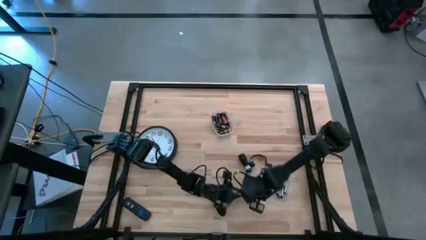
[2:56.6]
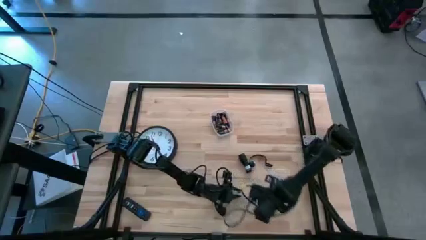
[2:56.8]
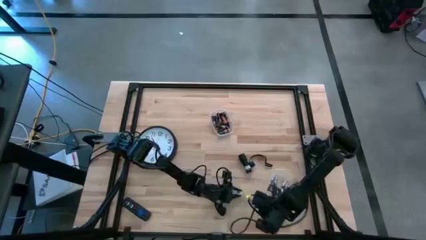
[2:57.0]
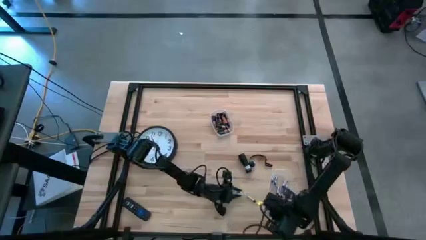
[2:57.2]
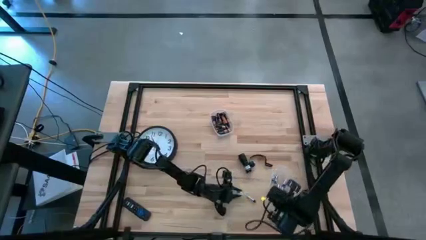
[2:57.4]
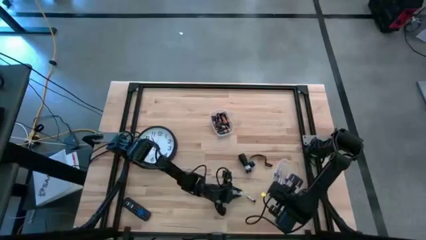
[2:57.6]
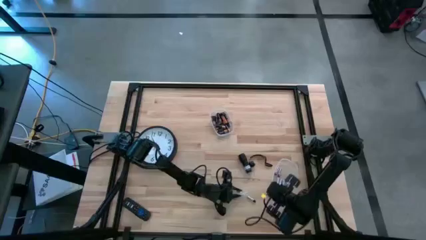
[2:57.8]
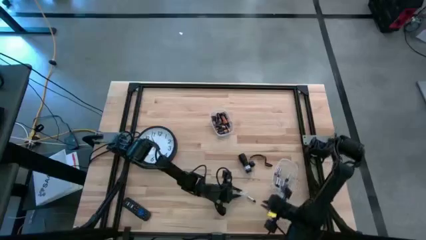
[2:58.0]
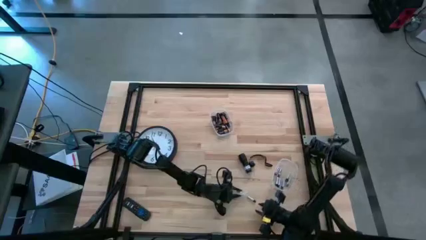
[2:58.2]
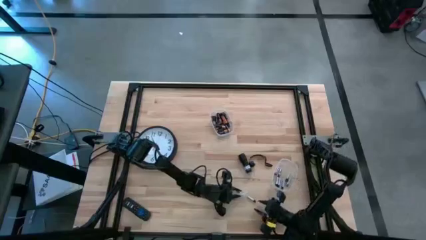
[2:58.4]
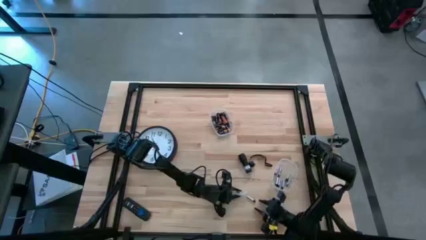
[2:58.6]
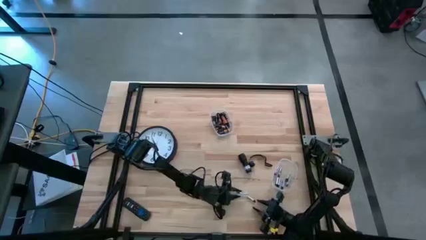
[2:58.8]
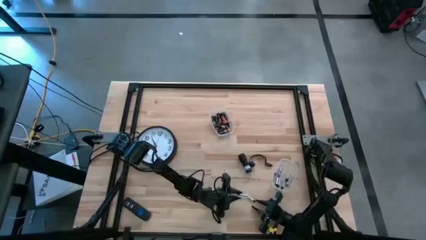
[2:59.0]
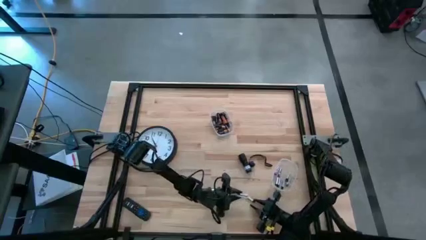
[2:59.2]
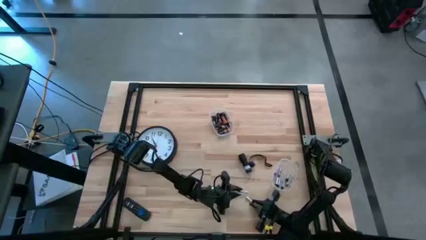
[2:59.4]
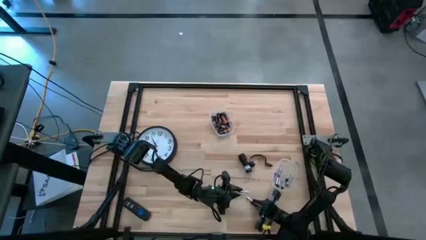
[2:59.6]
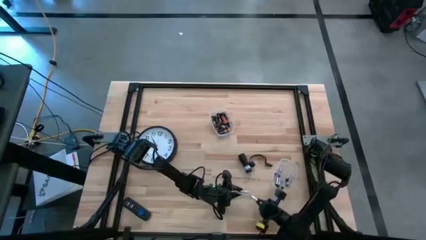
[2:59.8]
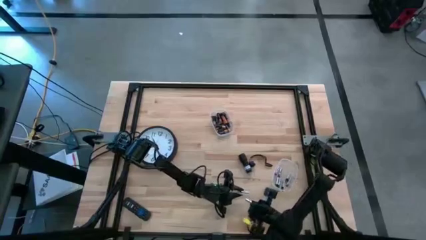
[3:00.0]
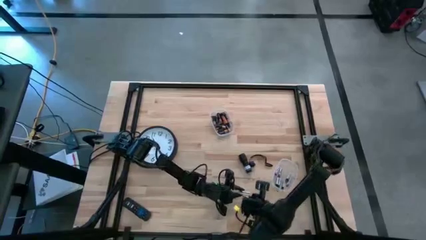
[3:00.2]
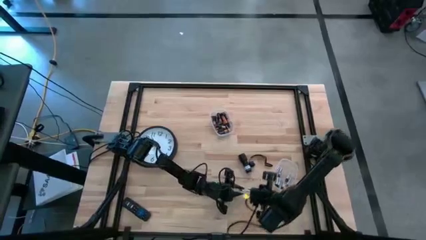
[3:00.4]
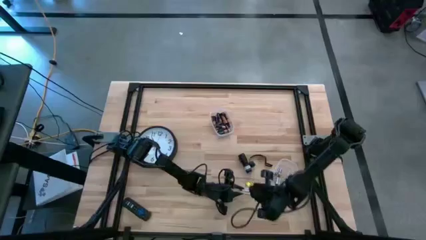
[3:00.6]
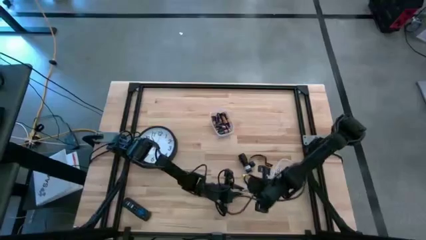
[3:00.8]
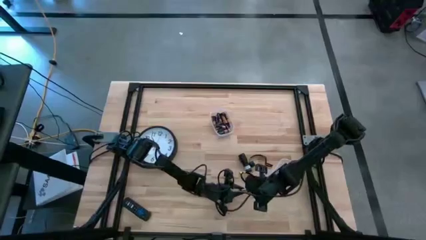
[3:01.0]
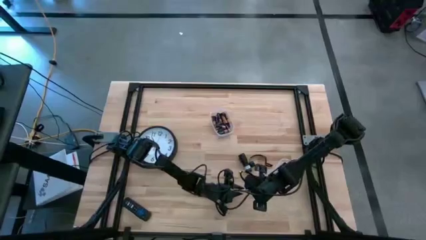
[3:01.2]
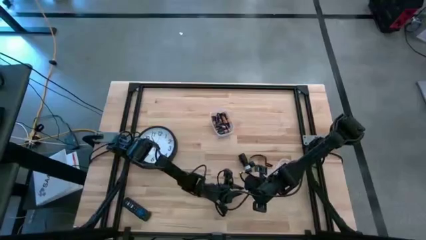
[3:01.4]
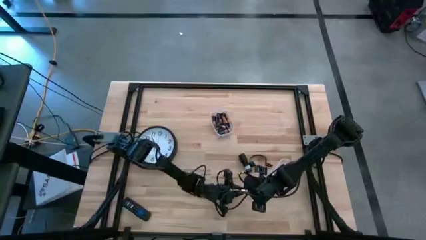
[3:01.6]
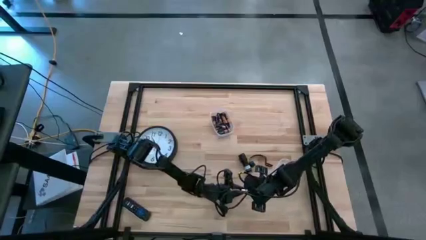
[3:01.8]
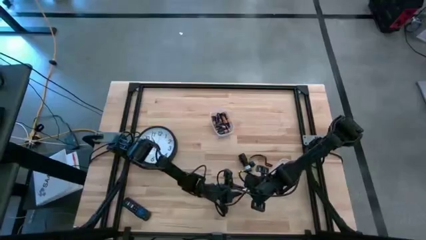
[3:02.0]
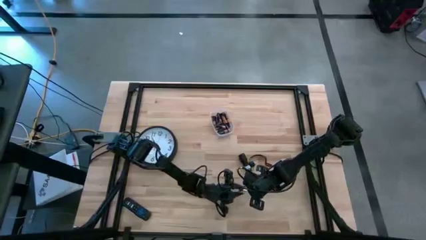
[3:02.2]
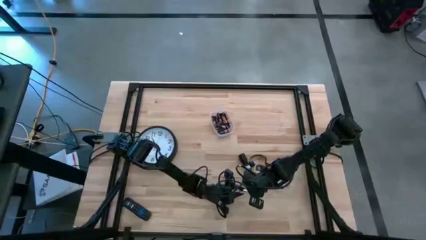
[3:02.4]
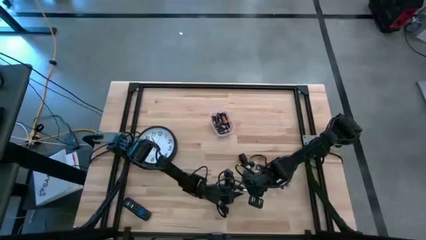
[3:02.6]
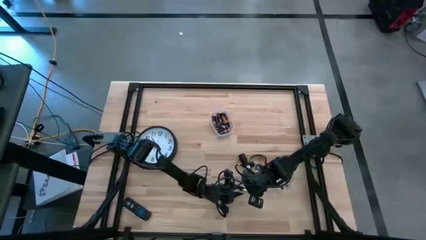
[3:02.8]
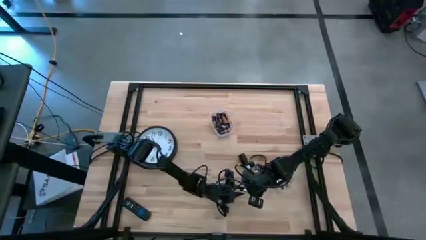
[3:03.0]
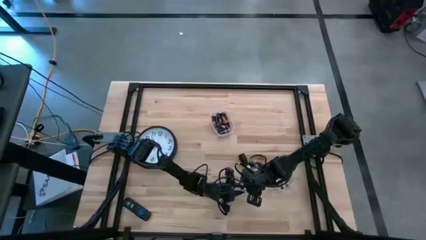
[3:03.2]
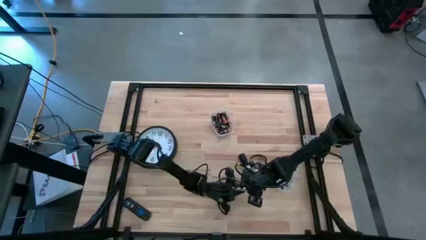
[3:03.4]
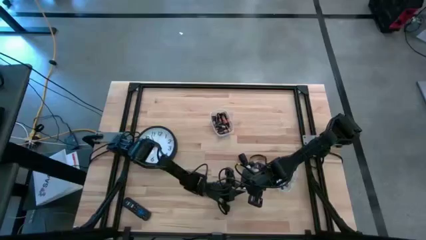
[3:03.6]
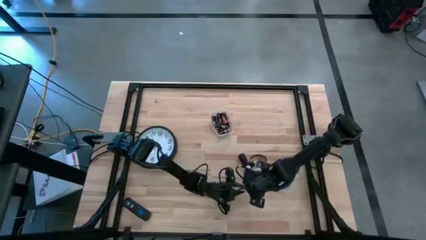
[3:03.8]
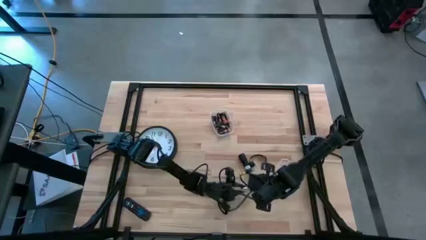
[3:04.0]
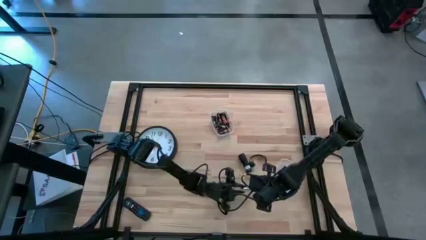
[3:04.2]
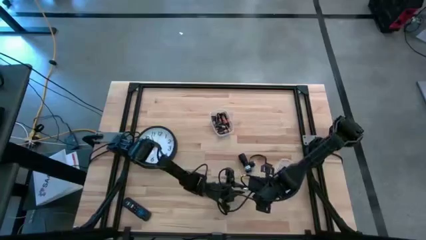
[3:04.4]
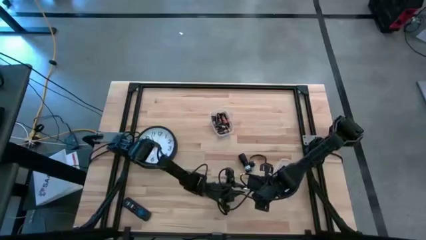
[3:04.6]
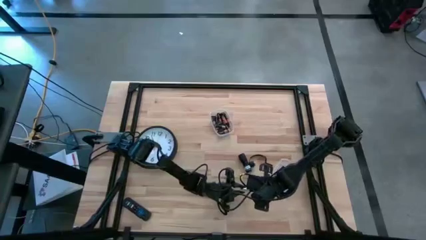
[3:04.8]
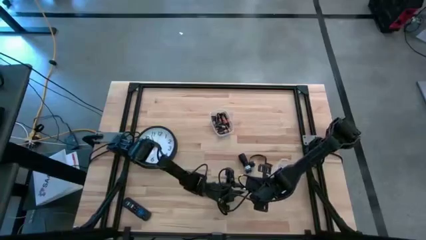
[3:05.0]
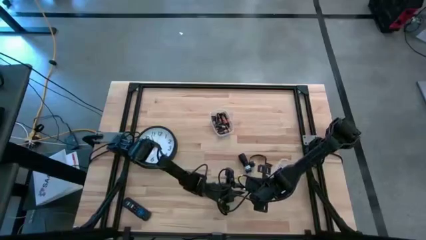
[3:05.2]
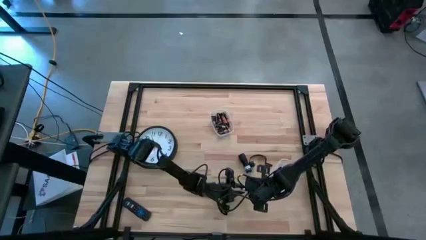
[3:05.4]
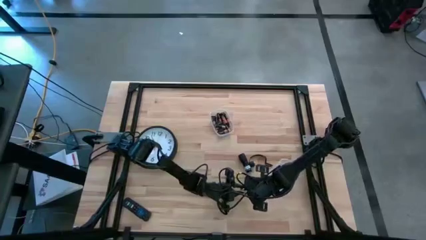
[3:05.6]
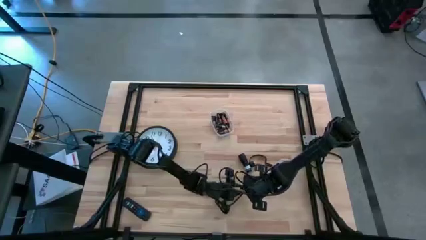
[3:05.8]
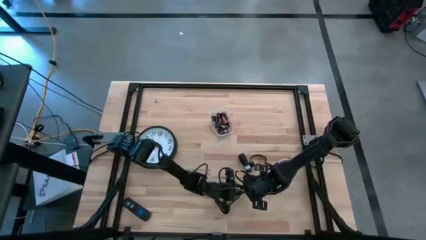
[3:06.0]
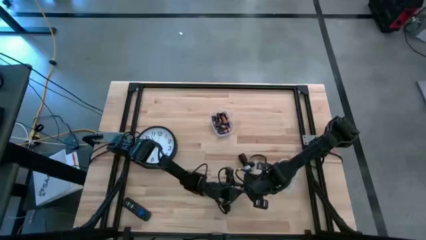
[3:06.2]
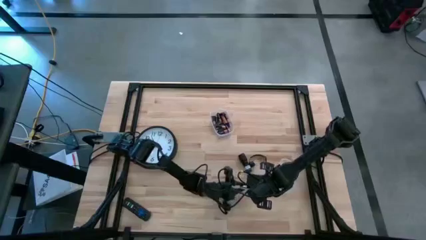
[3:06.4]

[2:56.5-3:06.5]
Task: Insert battery
Insert the silver battery into the battery holder

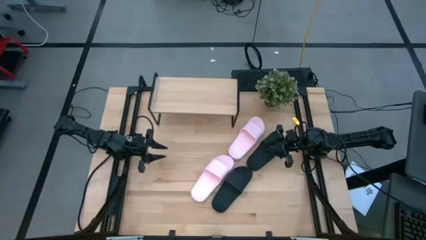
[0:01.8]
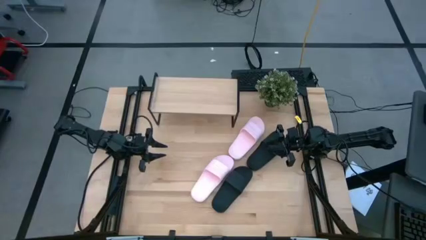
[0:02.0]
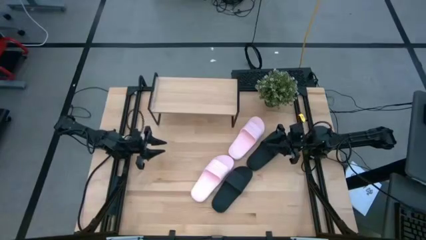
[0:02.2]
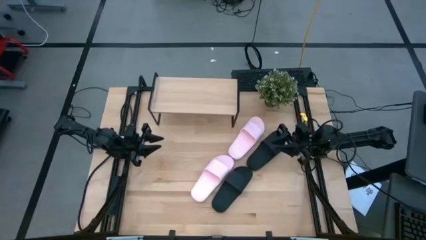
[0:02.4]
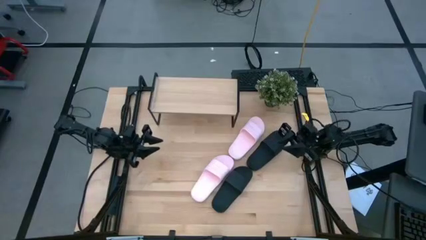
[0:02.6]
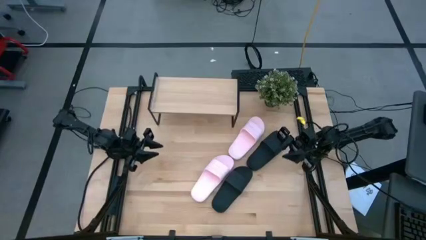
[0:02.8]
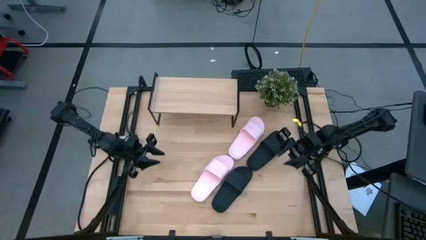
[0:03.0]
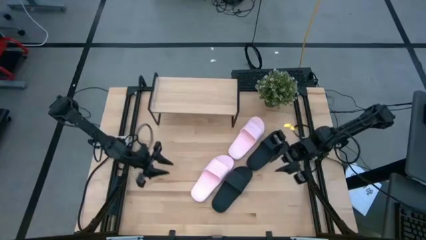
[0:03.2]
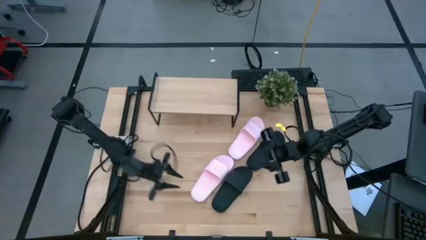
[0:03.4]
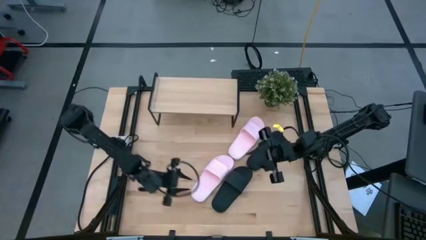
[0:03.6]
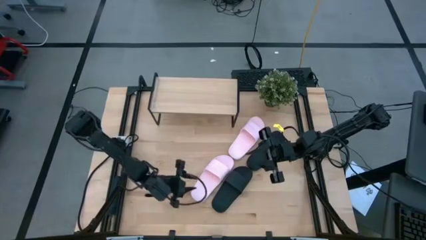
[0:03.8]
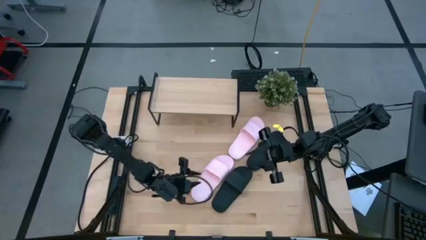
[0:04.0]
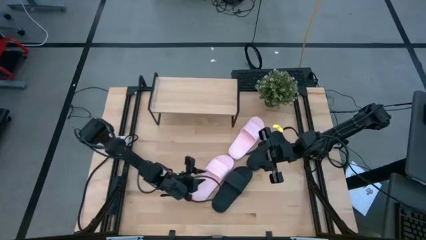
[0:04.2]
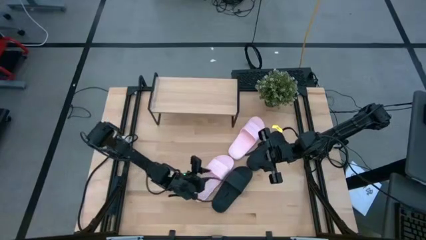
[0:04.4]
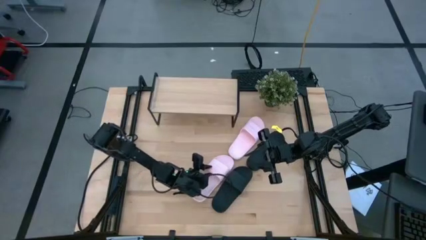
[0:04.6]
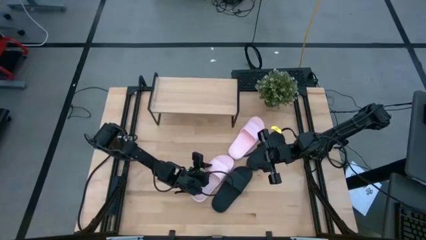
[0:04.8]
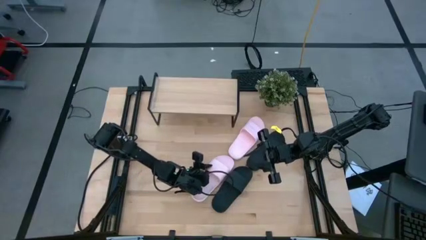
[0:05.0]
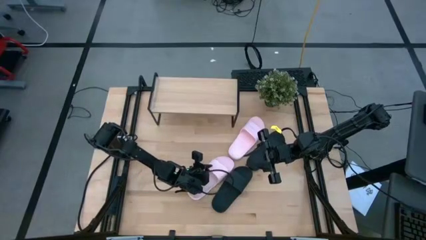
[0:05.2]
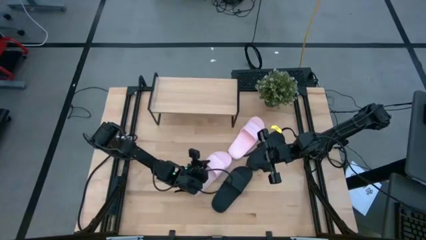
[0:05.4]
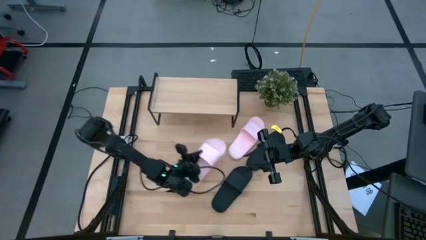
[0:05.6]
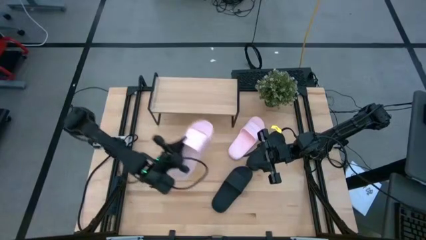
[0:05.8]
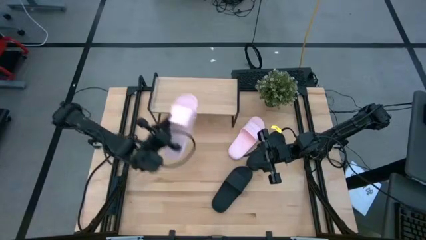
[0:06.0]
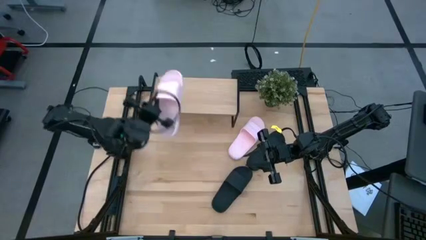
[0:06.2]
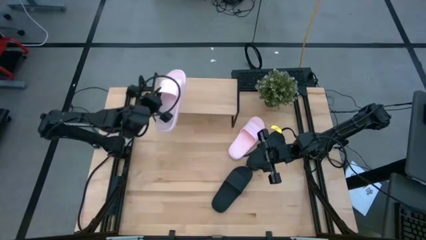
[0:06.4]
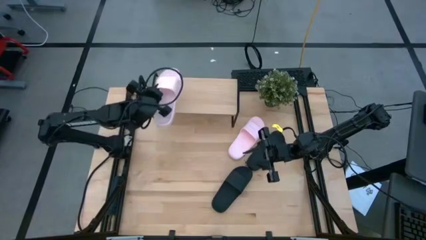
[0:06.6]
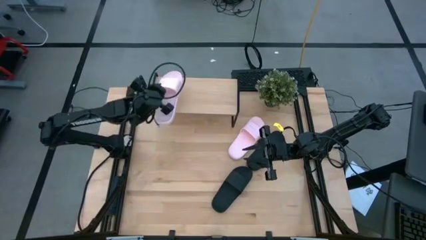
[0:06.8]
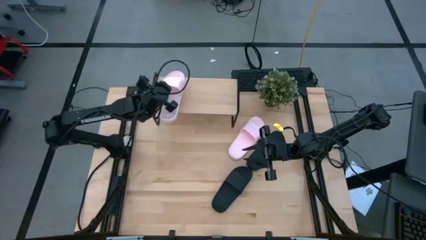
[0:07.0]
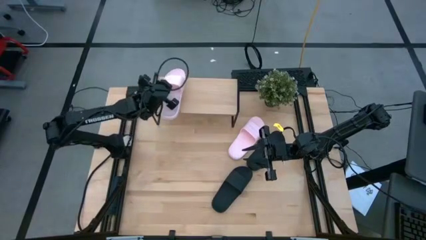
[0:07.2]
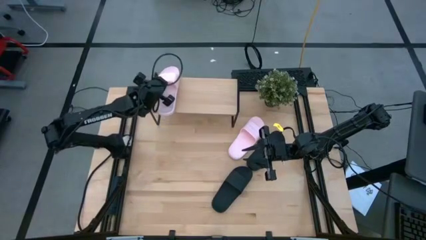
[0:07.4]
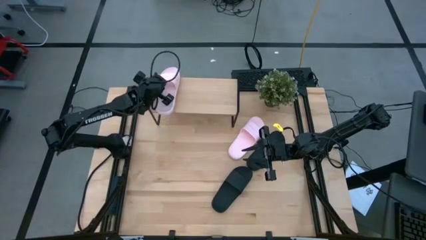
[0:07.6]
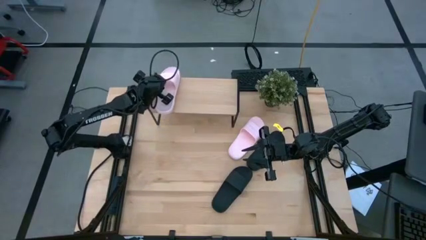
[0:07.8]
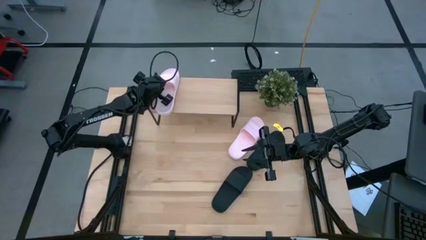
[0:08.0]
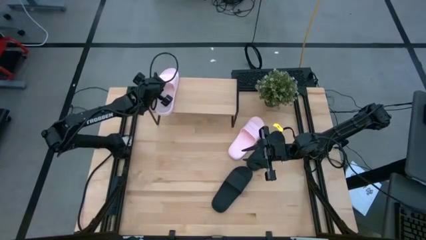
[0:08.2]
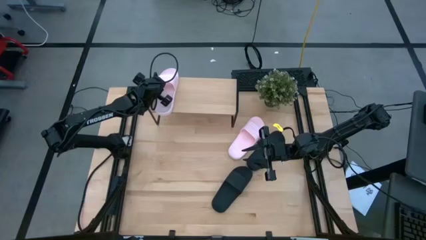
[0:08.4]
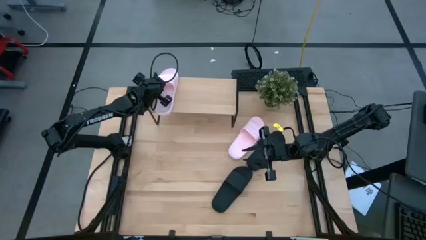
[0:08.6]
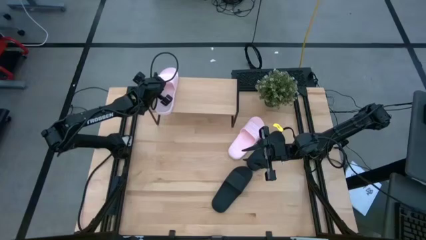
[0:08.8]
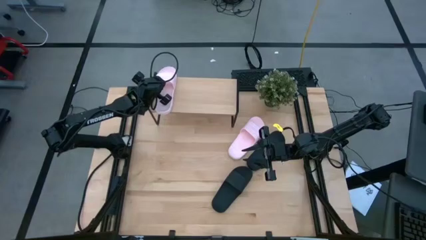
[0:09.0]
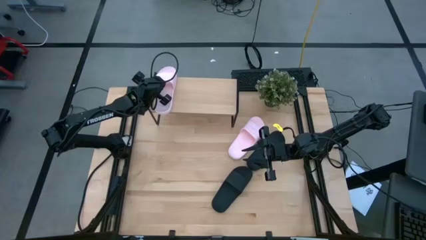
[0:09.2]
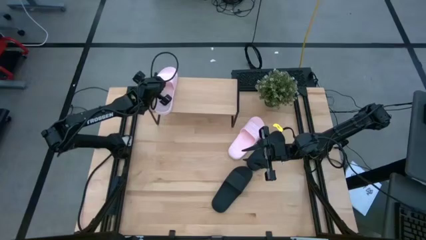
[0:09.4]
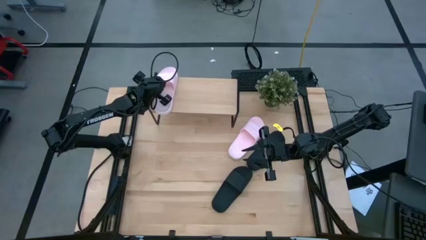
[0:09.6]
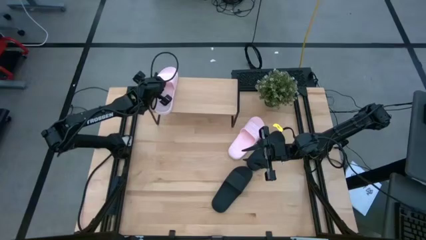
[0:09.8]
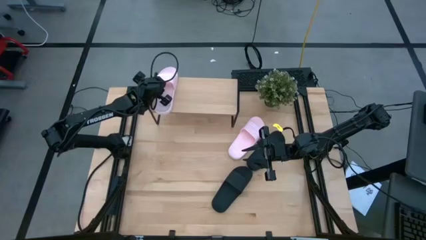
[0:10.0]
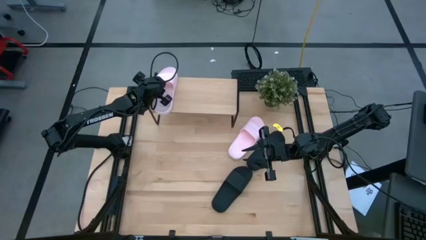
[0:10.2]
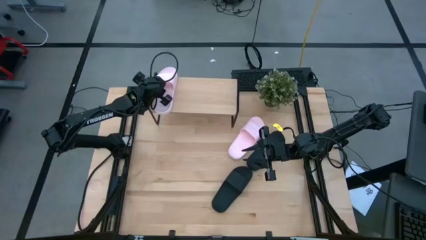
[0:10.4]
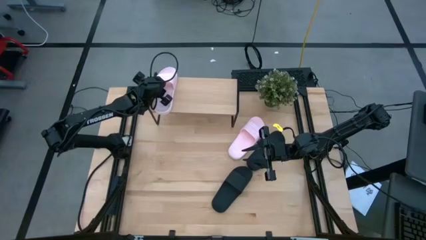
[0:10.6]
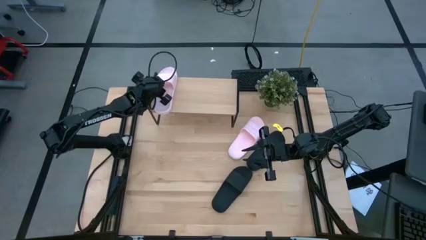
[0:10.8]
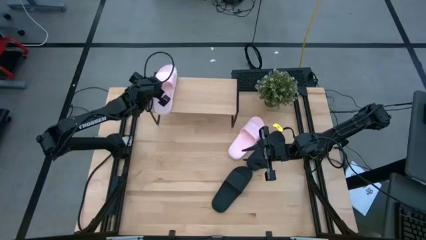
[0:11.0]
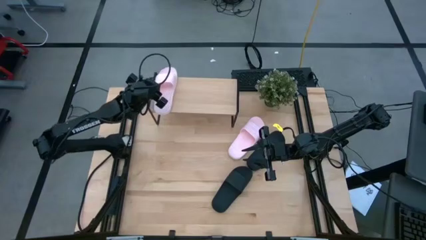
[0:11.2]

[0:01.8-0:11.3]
Task: Pick and place slides into the shelf
Put the bottom pink slipper on the shelf
